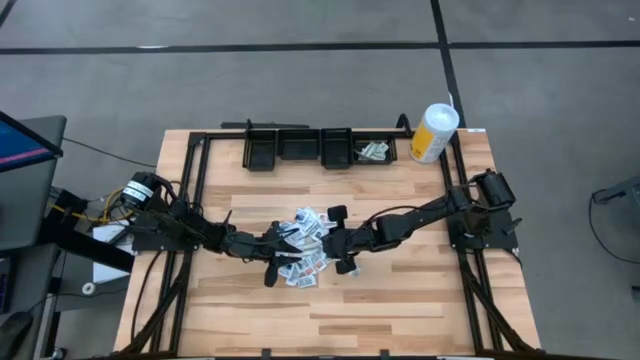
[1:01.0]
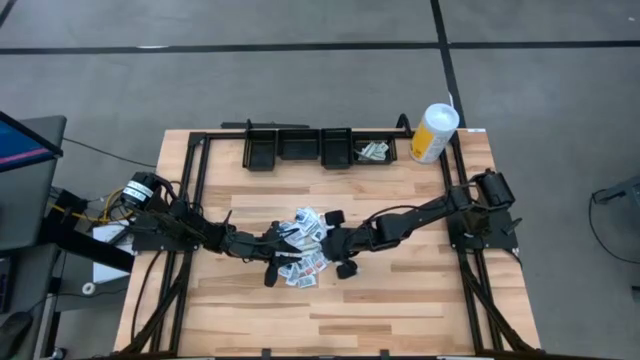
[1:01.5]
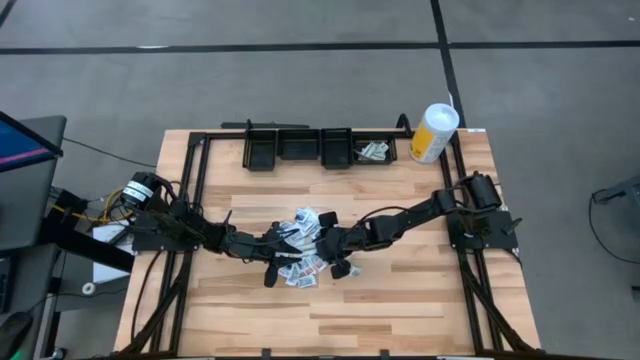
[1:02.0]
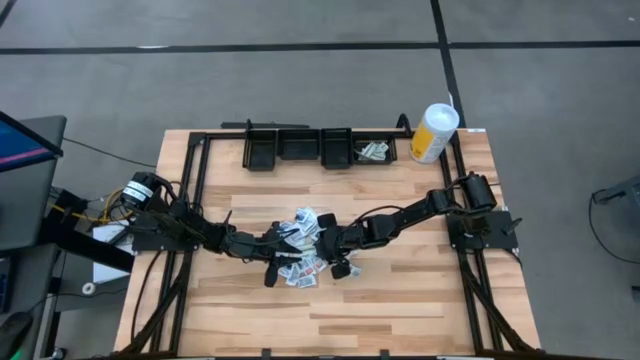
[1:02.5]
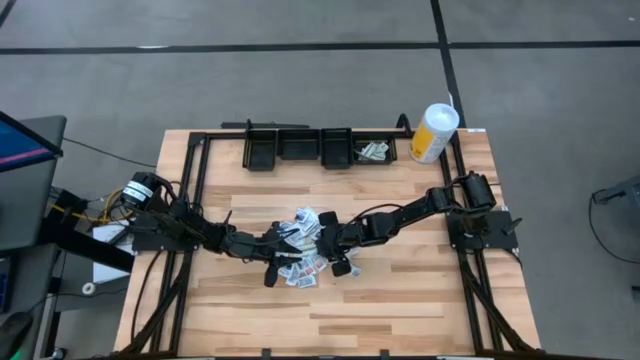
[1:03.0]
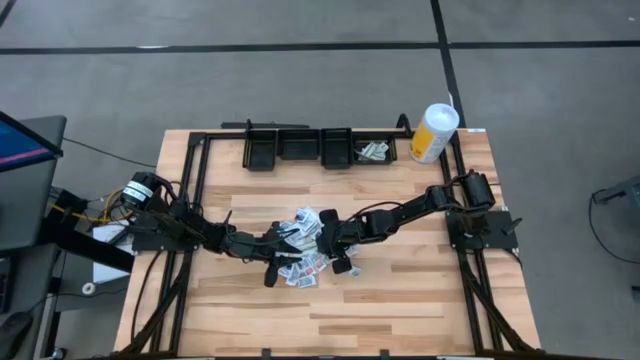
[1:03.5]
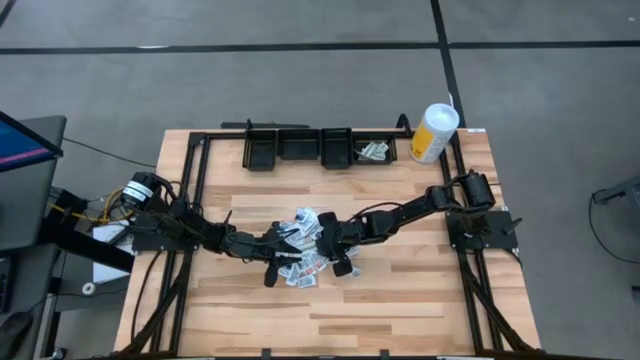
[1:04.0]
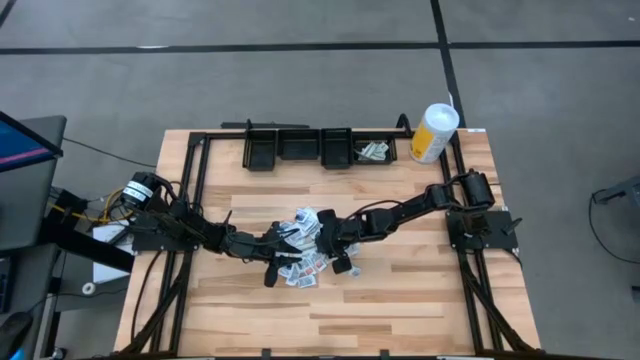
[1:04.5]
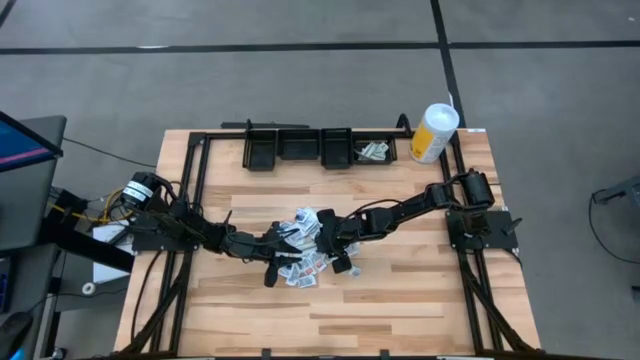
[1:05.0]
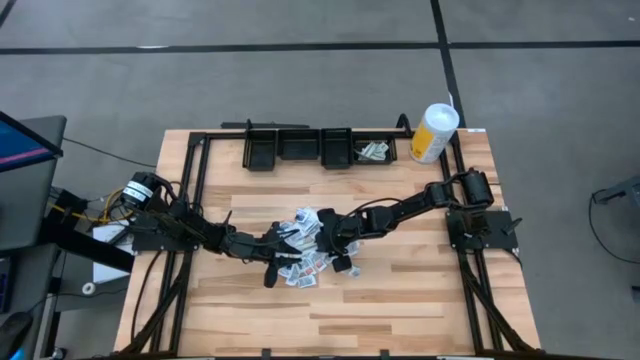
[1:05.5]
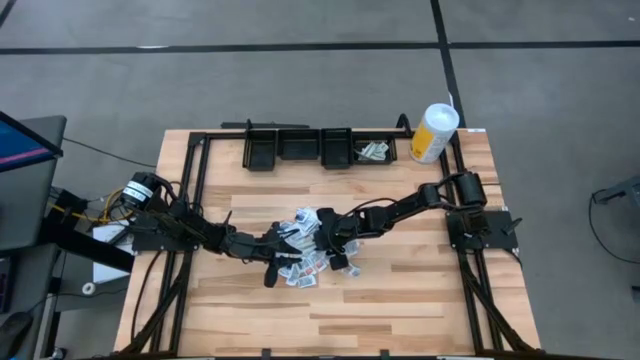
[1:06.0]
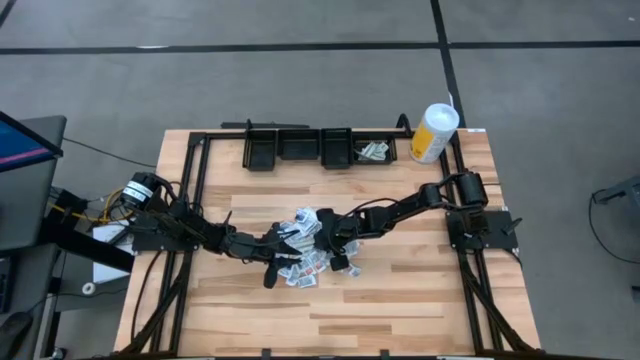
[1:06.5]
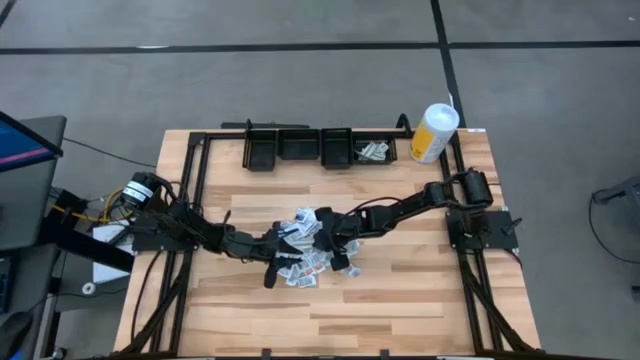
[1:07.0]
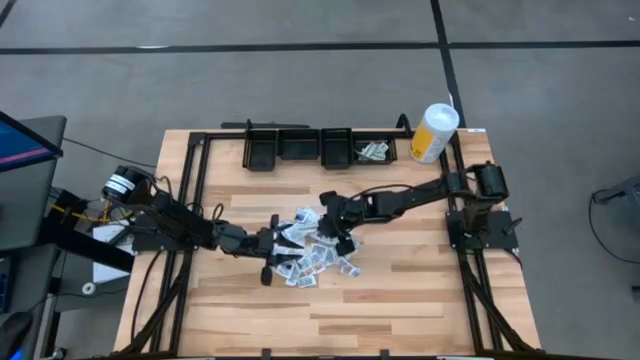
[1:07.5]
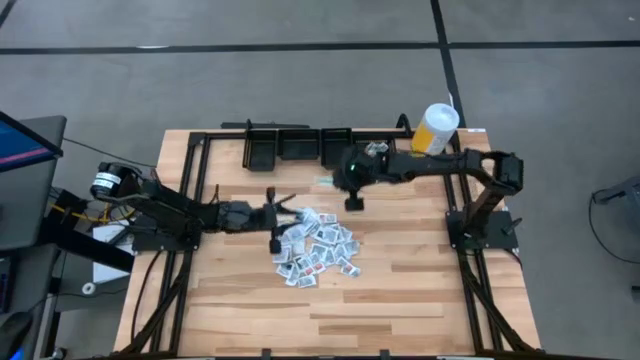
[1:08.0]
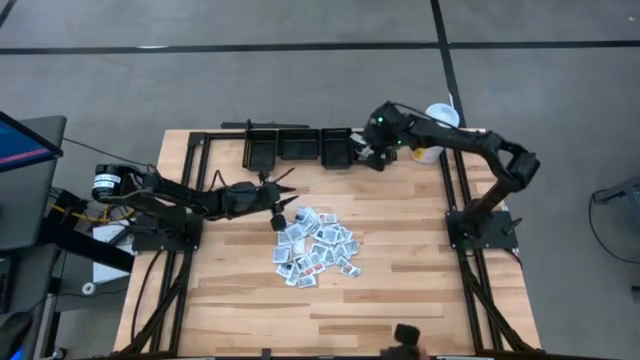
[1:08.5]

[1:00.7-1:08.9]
Task: Pick & Place First Aid Supplies
Put the green bandage pack into the right black bin

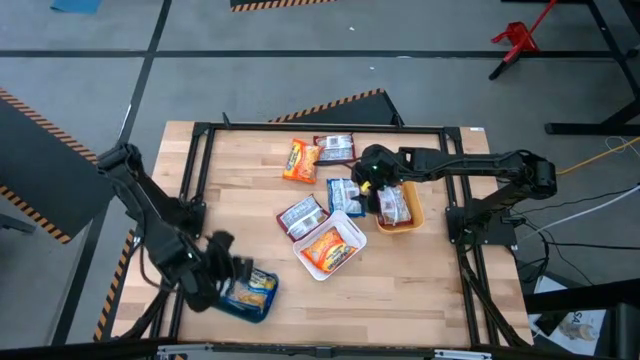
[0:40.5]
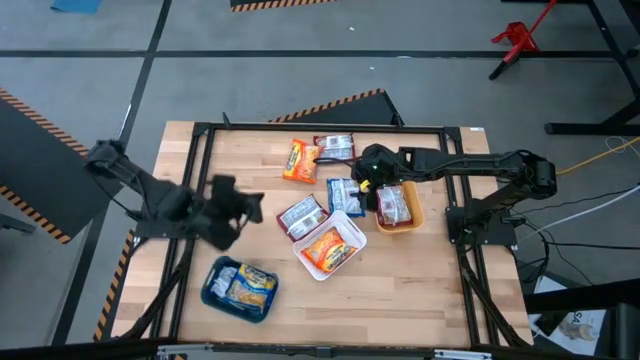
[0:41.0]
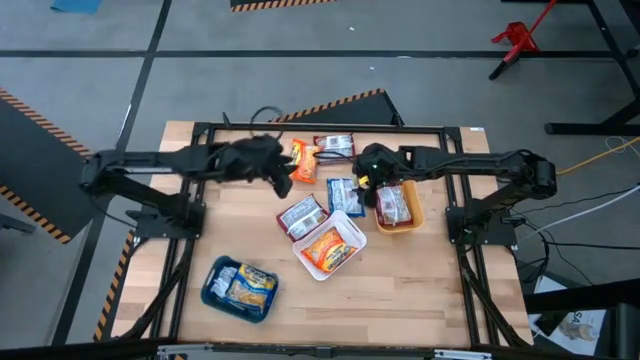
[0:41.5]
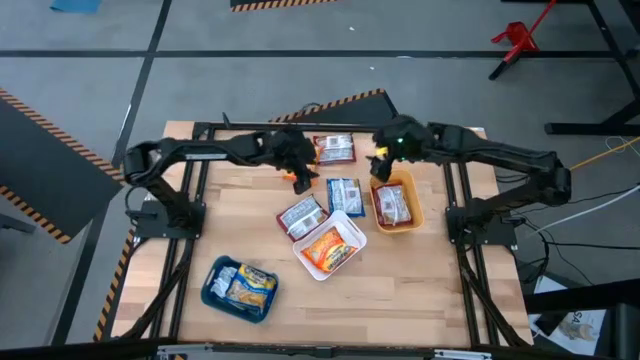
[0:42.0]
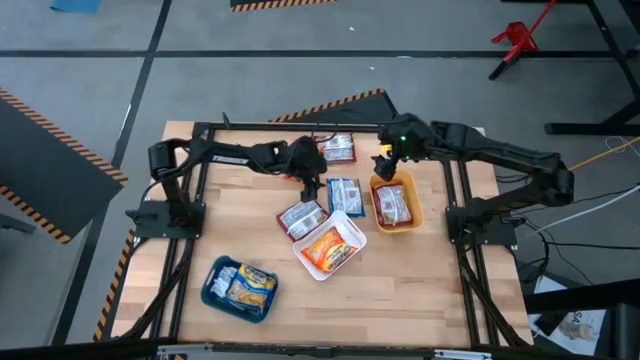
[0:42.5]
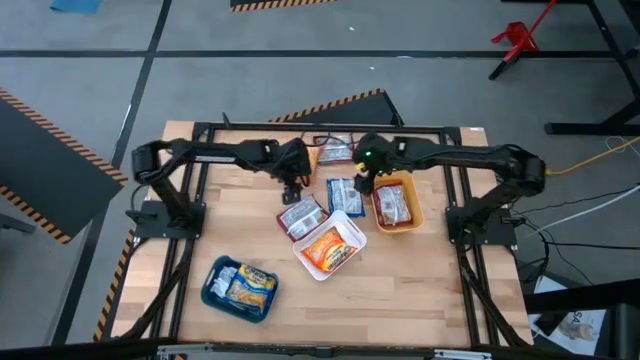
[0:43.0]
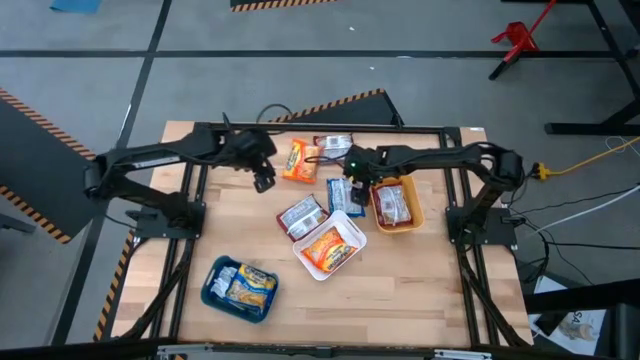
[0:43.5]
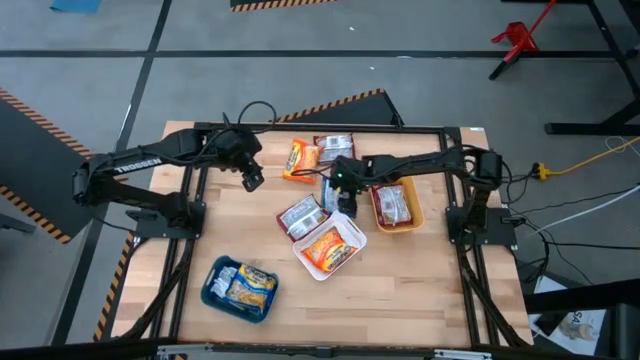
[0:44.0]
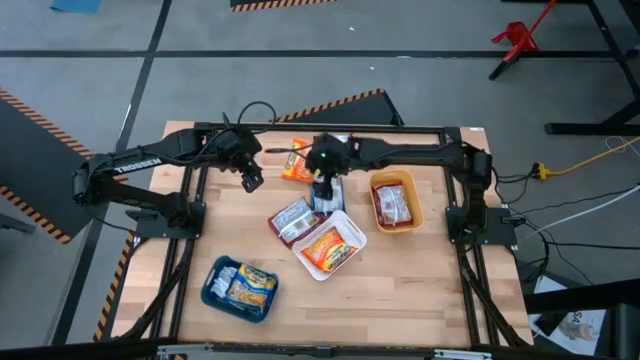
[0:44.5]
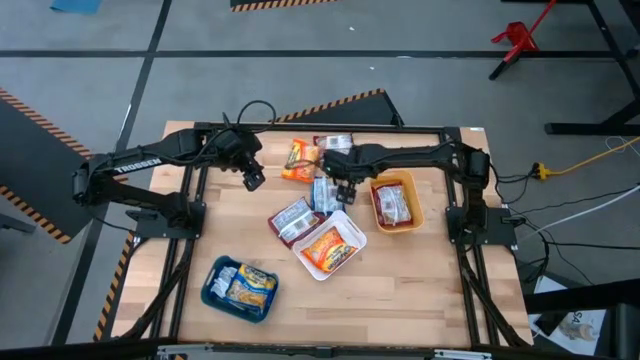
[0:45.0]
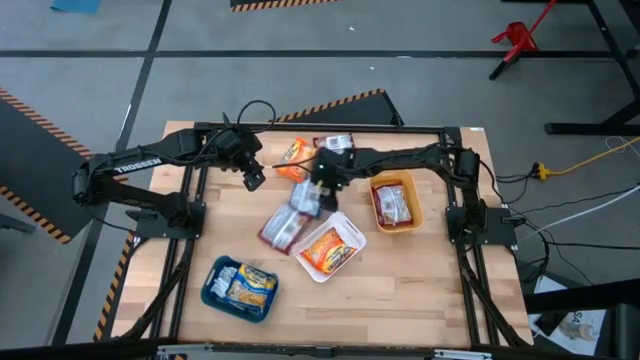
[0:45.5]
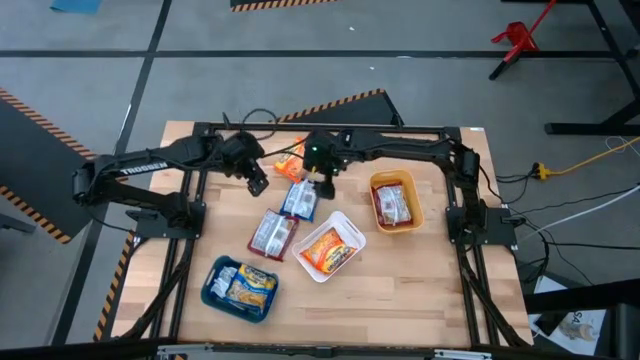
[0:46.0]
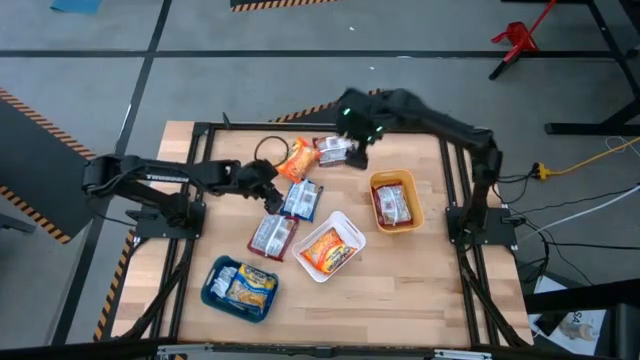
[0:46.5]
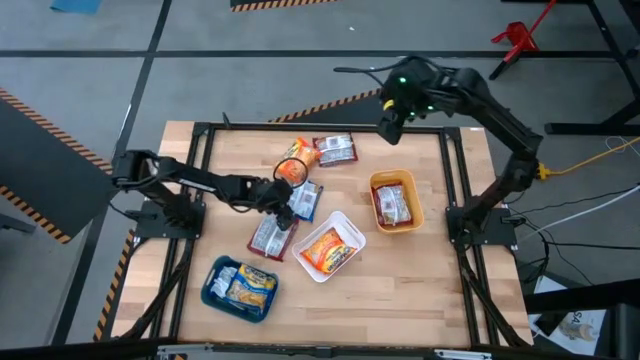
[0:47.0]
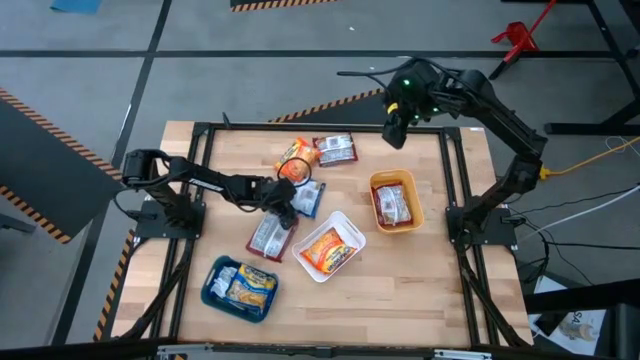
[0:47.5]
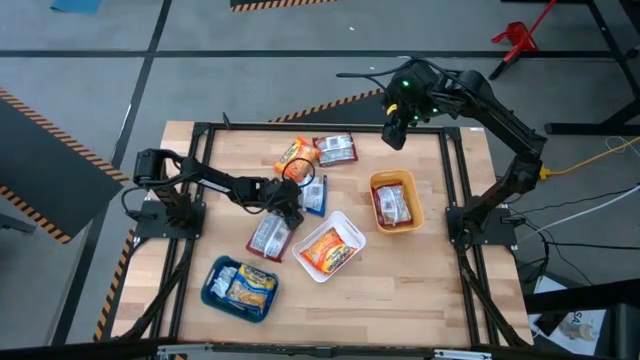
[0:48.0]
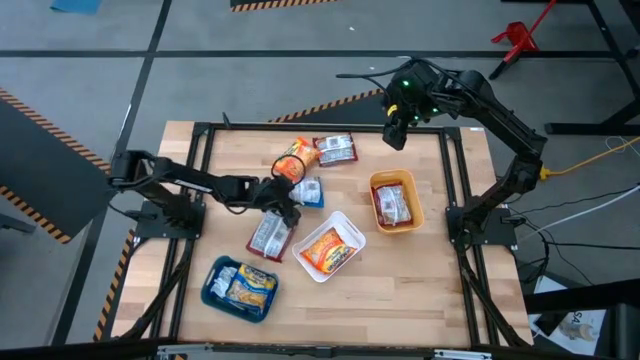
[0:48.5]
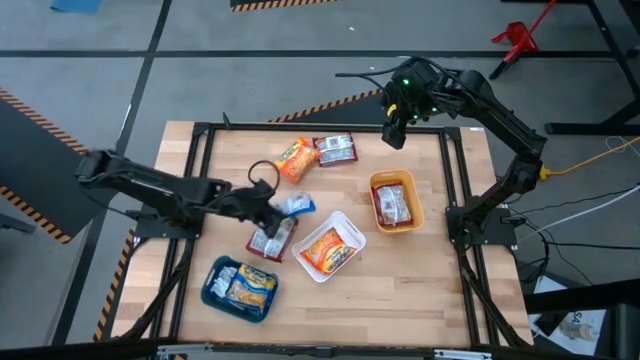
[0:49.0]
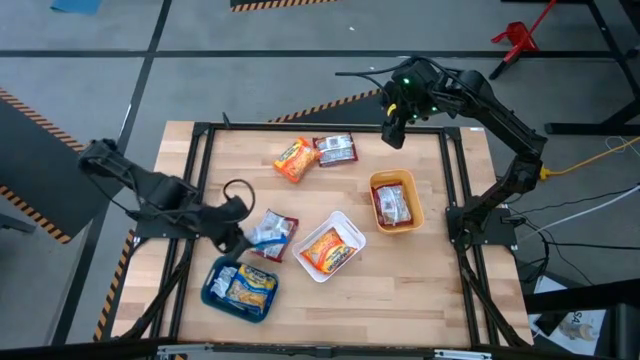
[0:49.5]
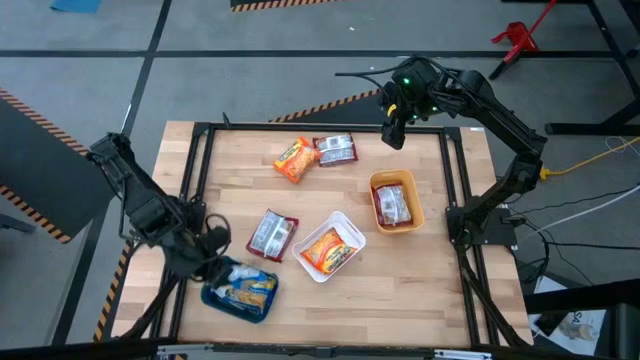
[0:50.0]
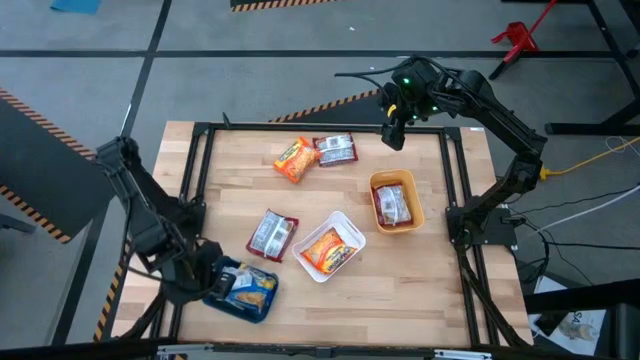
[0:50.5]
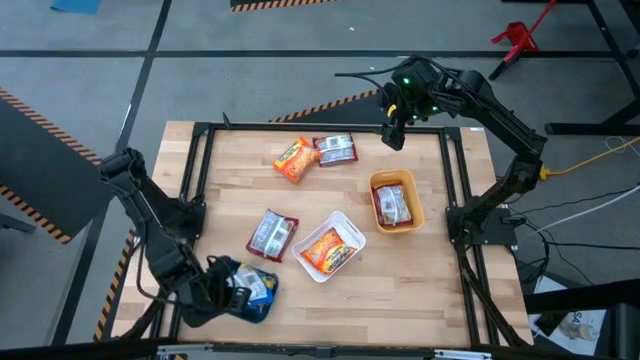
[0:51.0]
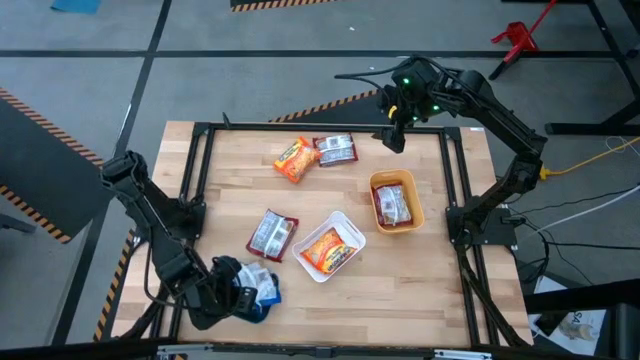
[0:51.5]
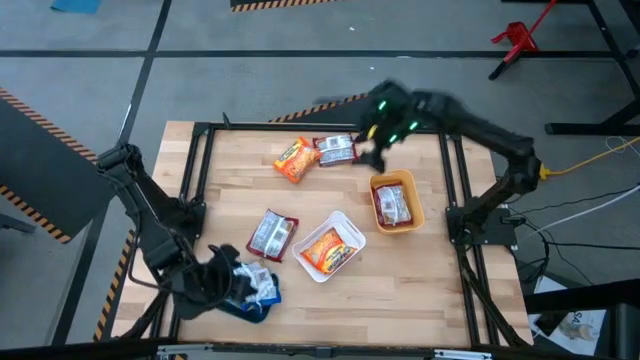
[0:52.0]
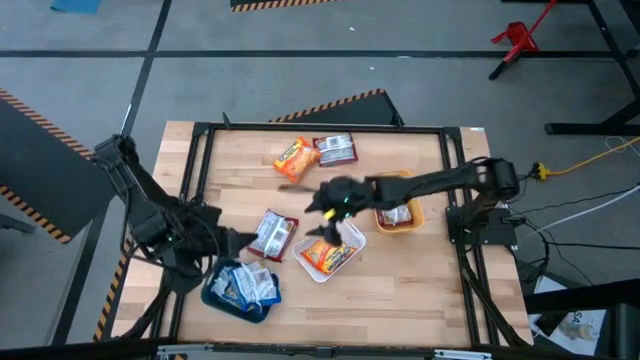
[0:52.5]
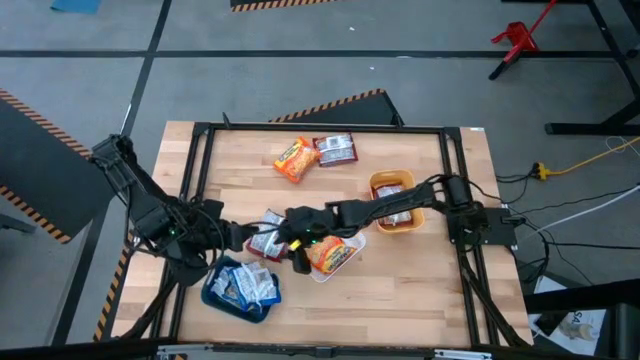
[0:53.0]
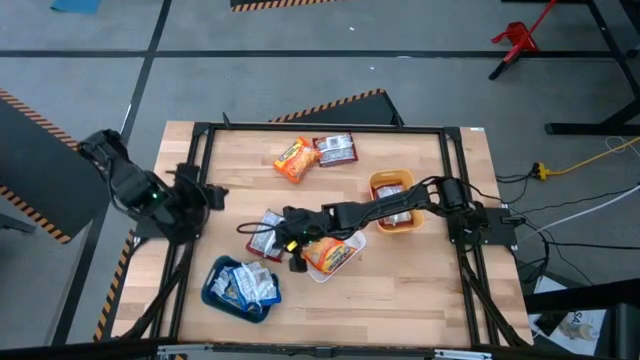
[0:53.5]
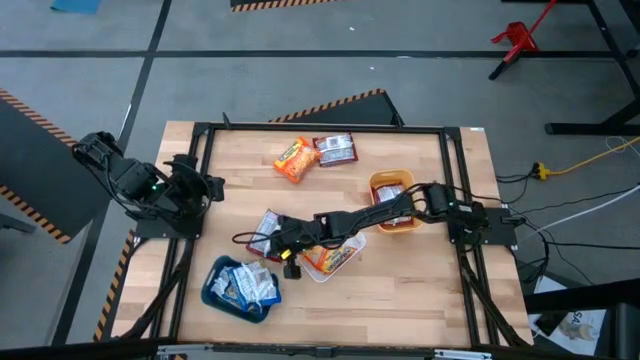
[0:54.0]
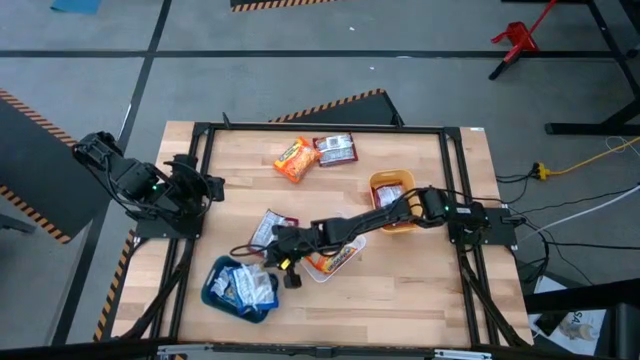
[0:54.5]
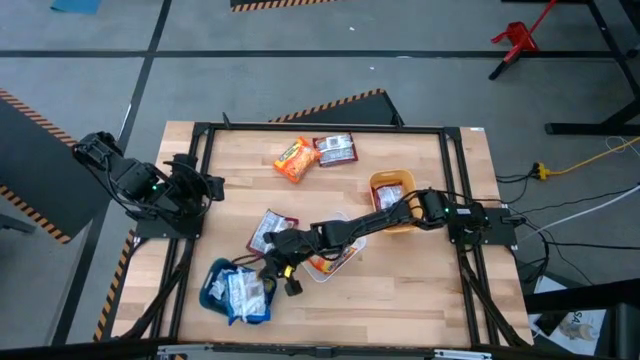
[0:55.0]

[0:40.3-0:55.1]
Task: Sort Maruchan noodles
Put the blue noodle pack into the green bin
